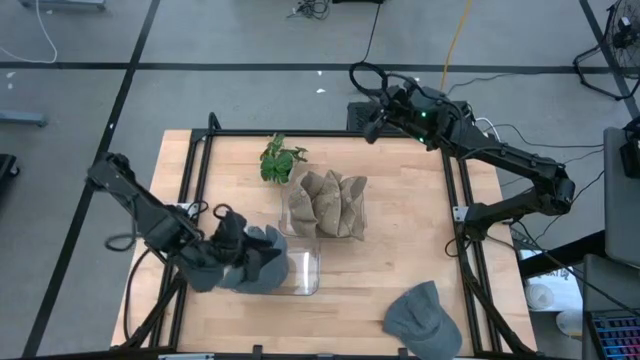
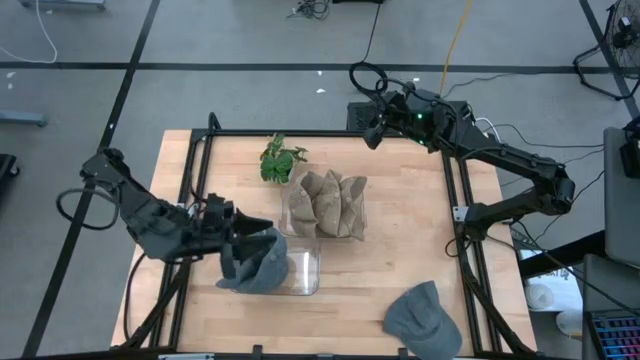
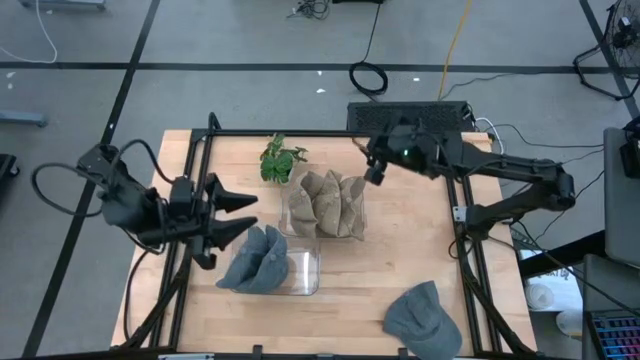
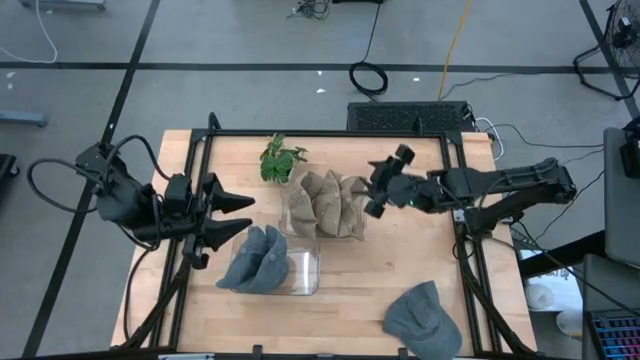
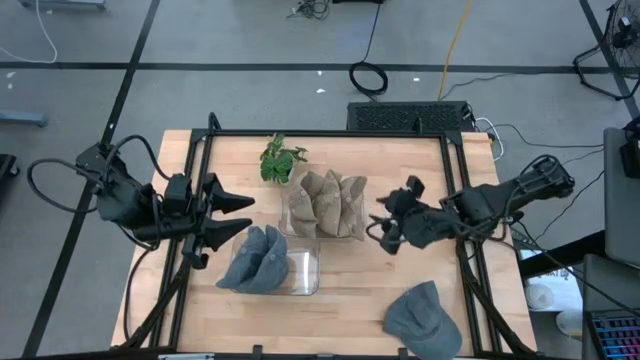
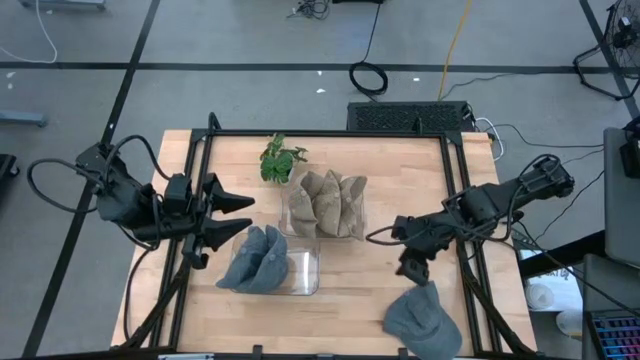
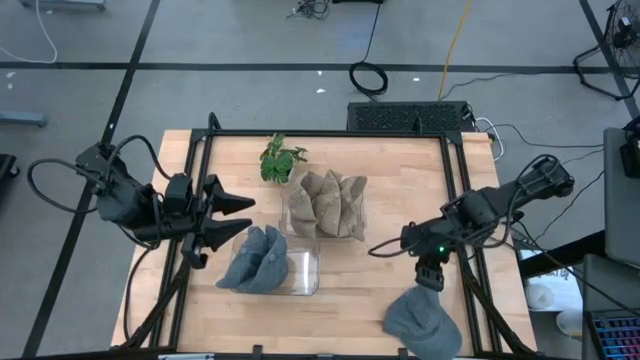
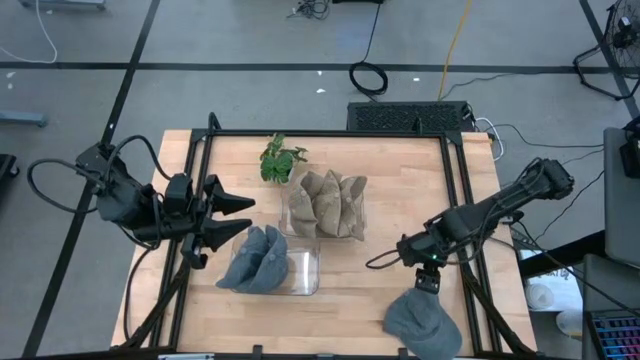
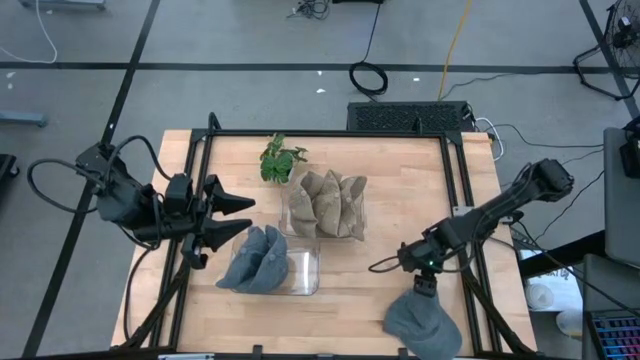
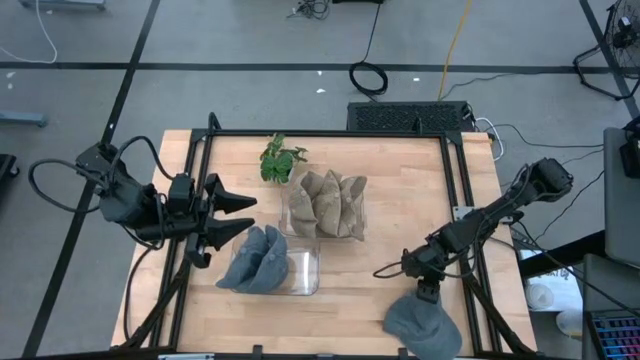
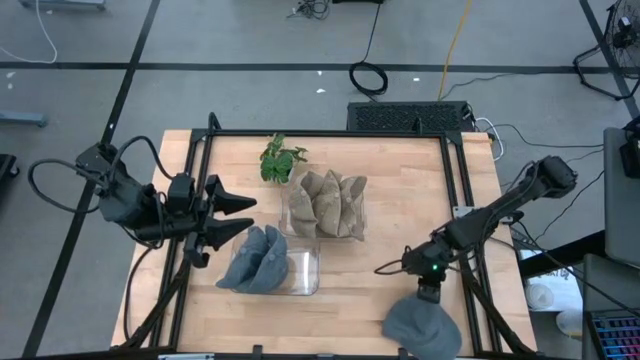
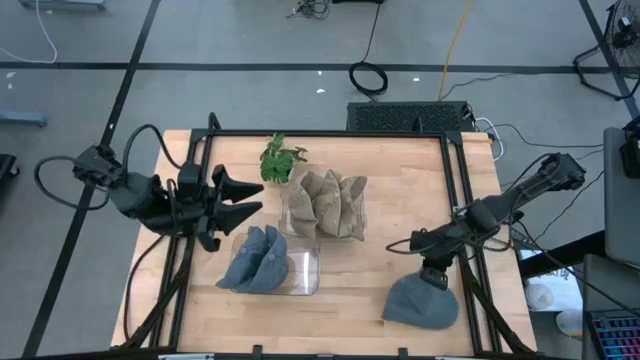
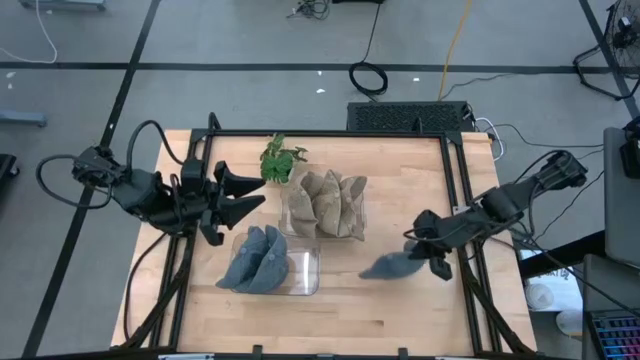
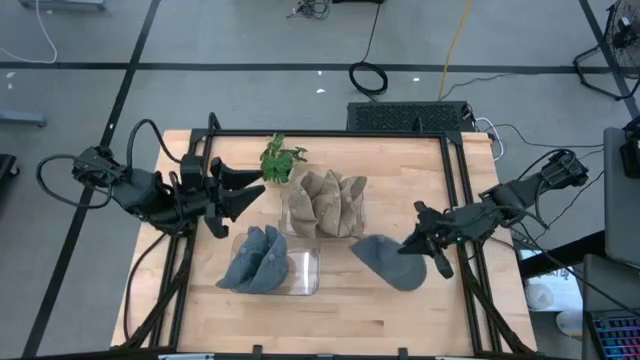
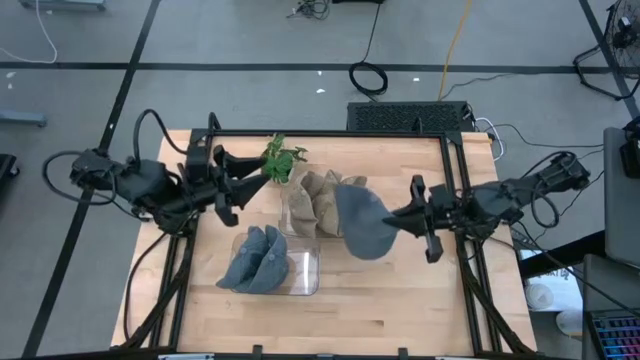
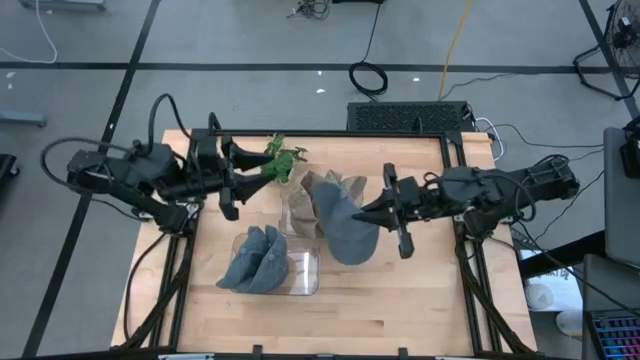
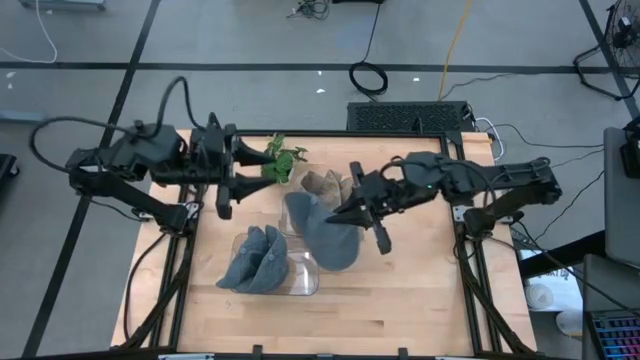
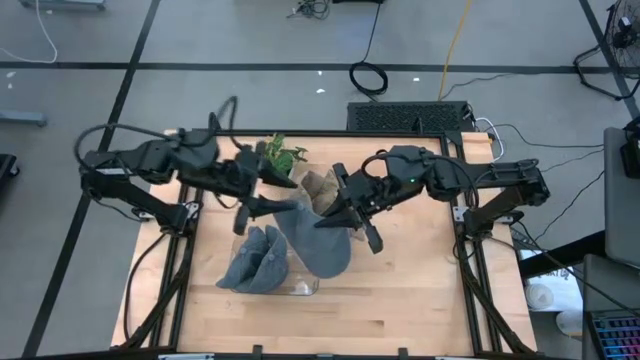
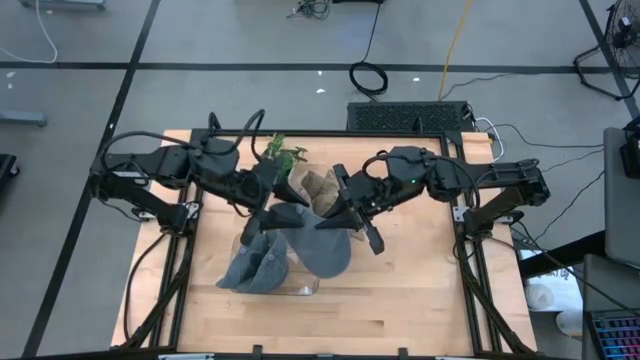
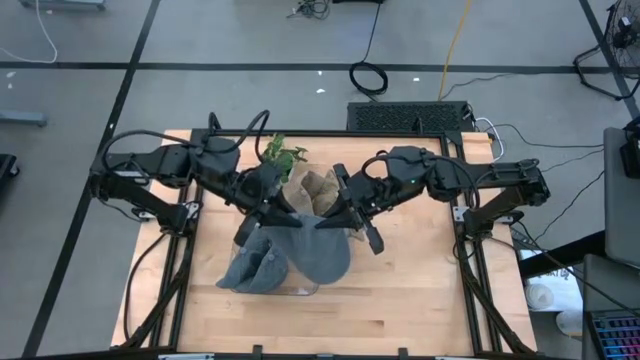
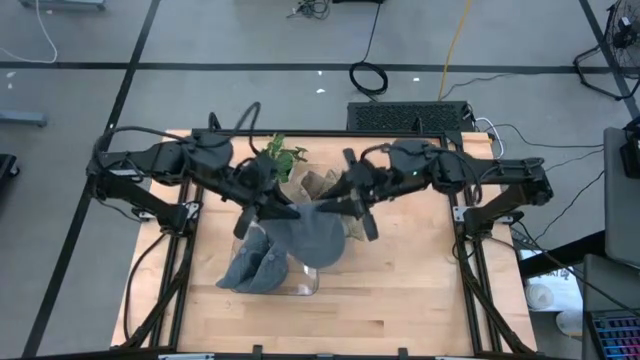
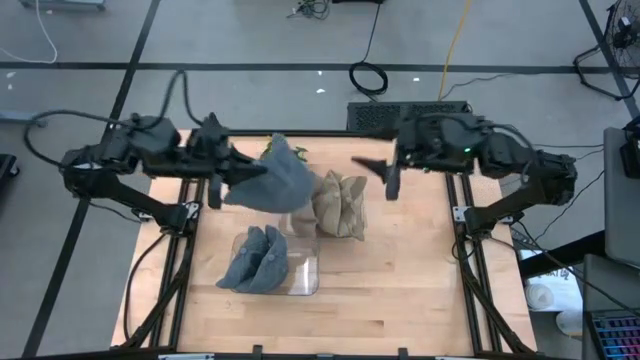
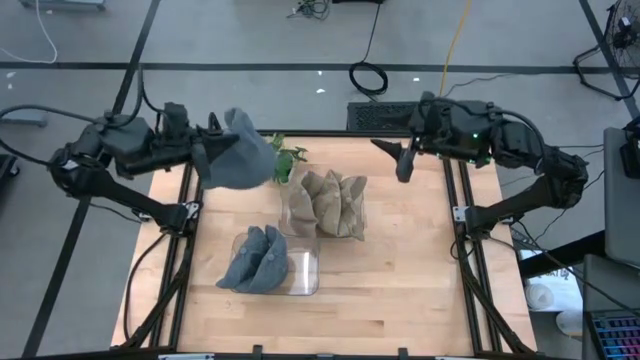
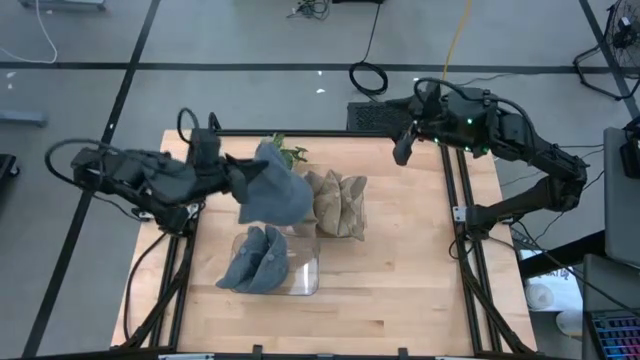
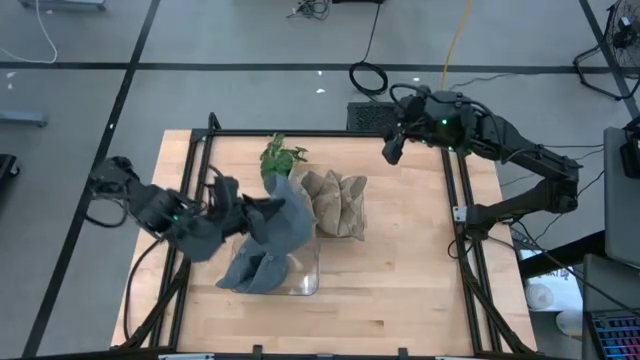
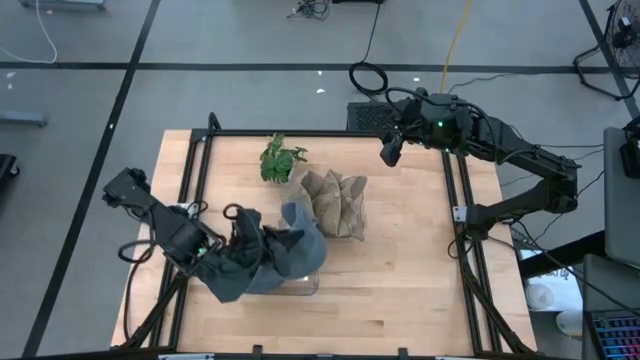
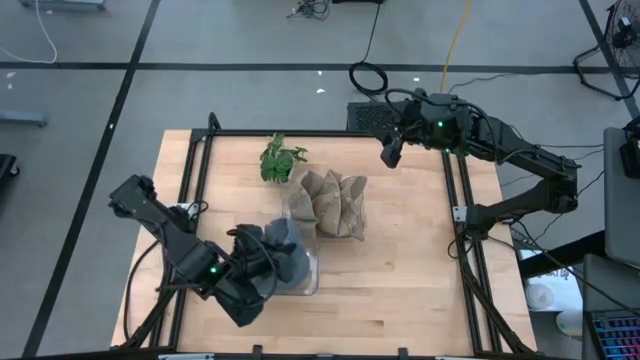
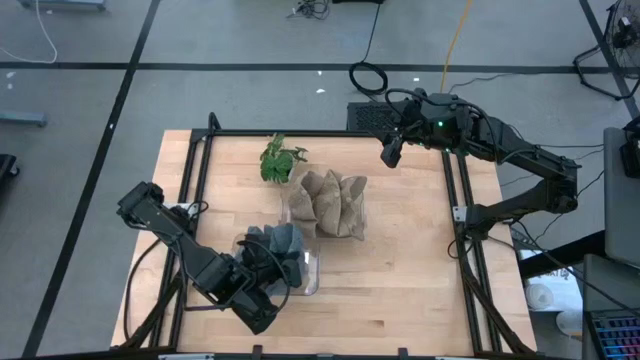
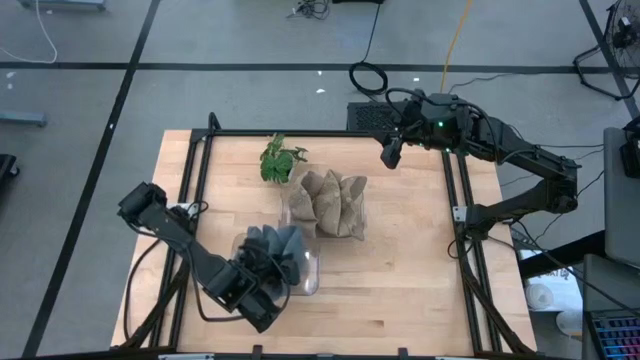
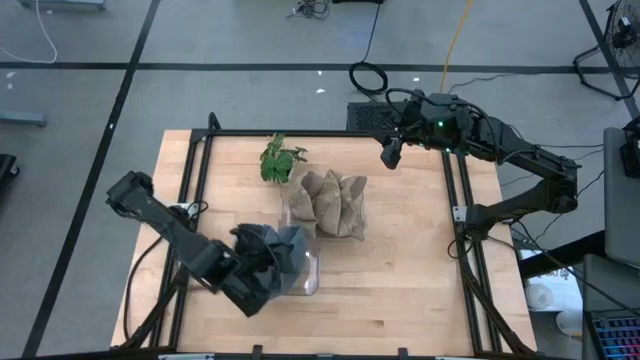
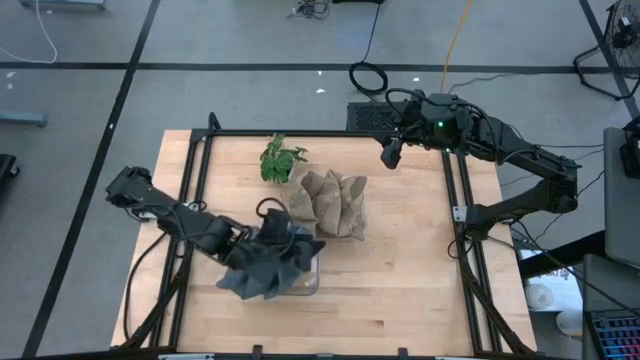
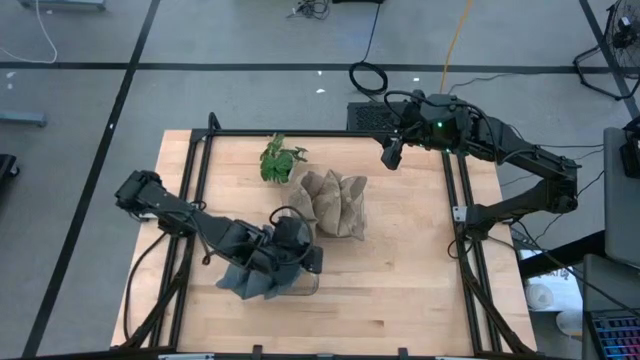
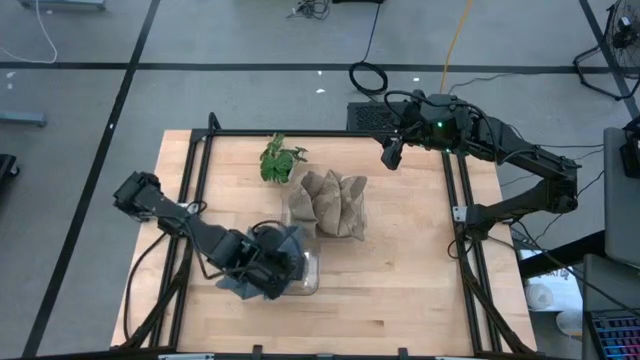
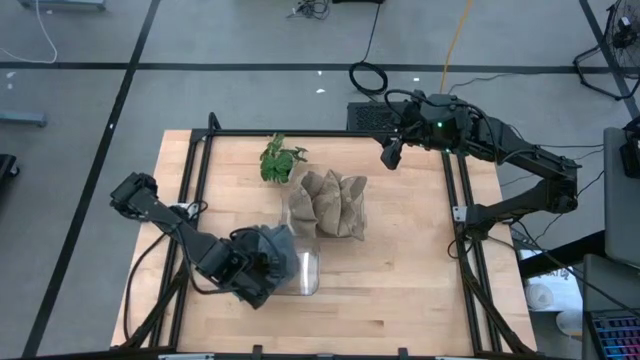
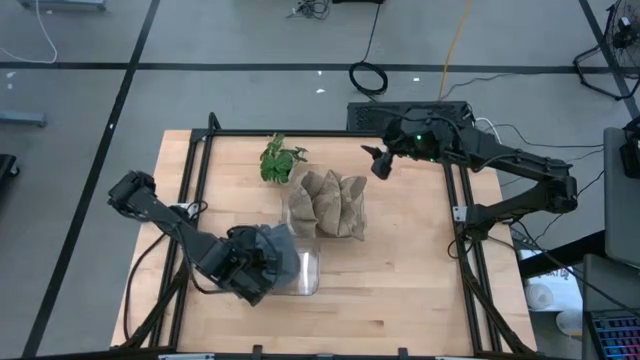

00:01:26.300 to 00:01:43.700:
Task: Pick & Place hat
Put the blue cap into the bottom transparent bin
